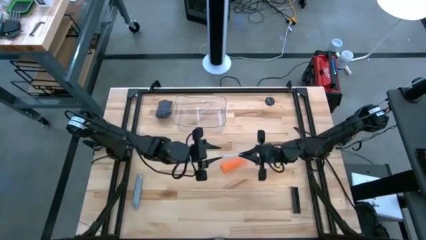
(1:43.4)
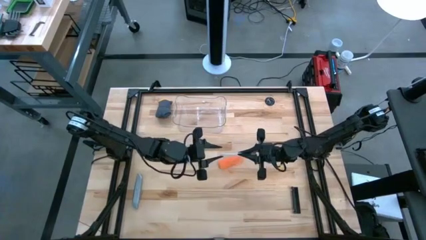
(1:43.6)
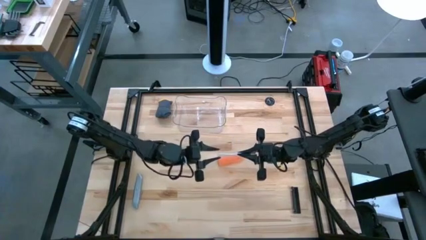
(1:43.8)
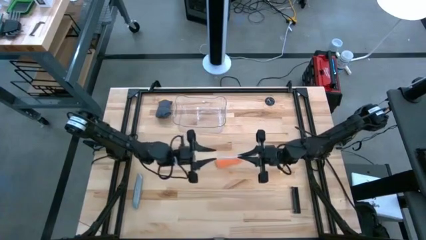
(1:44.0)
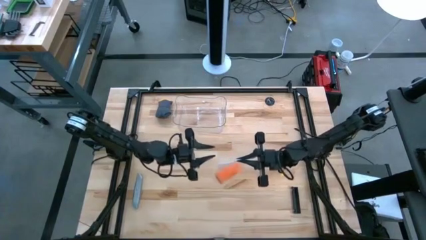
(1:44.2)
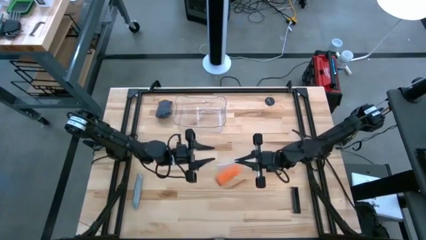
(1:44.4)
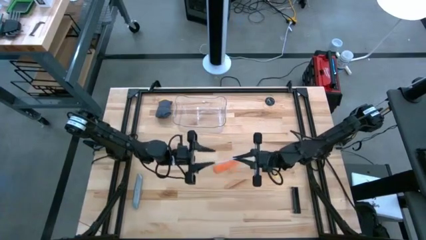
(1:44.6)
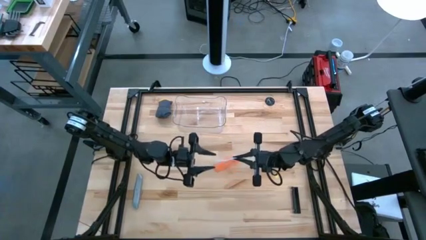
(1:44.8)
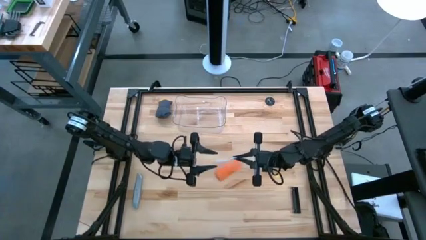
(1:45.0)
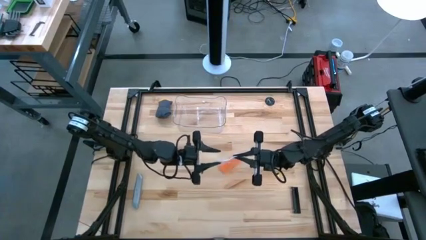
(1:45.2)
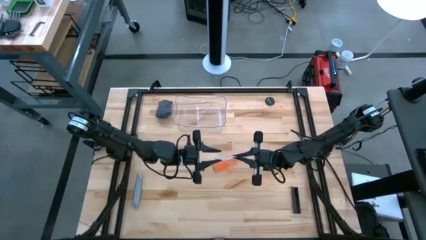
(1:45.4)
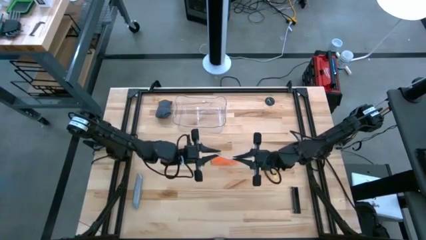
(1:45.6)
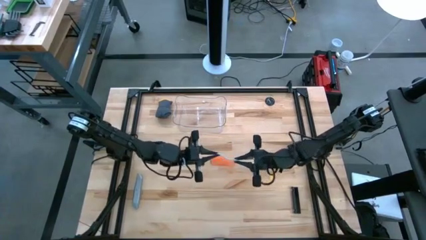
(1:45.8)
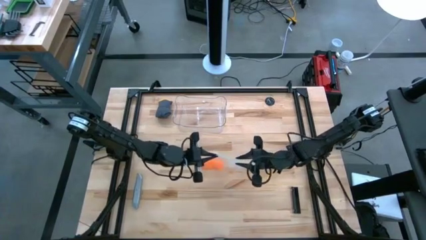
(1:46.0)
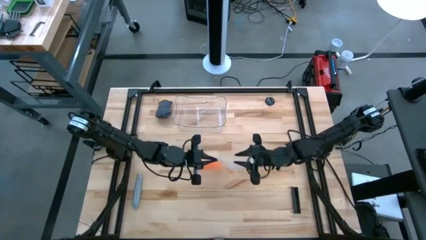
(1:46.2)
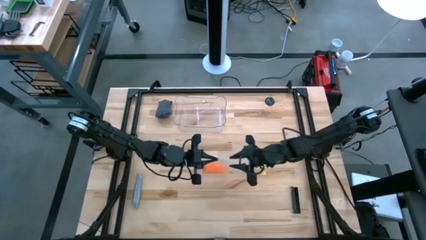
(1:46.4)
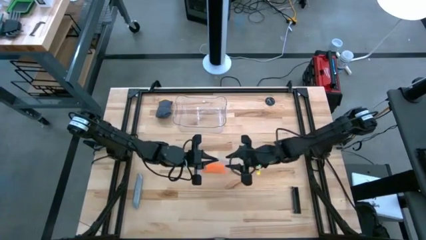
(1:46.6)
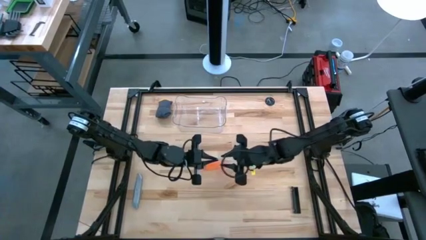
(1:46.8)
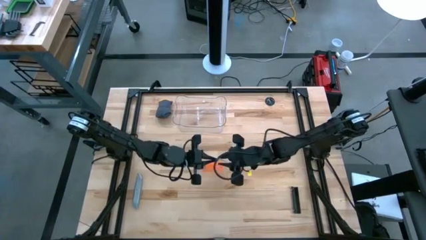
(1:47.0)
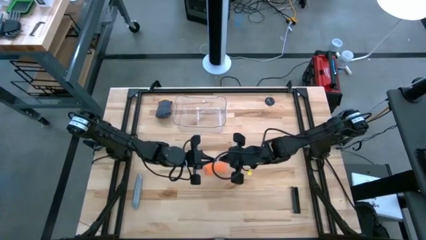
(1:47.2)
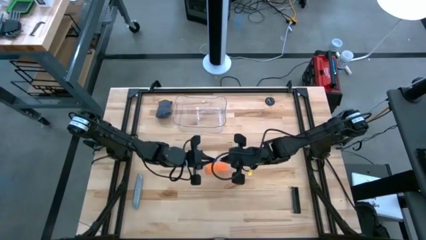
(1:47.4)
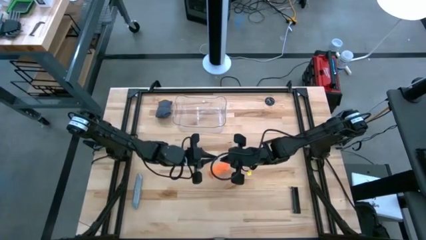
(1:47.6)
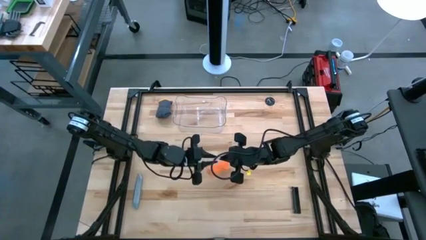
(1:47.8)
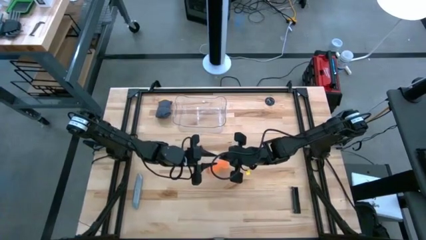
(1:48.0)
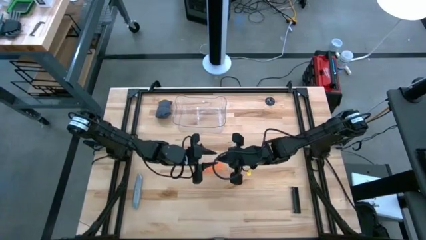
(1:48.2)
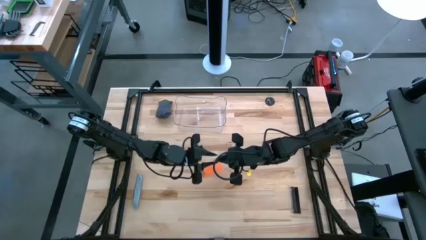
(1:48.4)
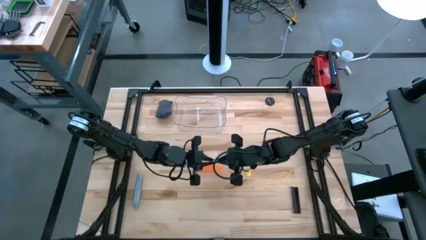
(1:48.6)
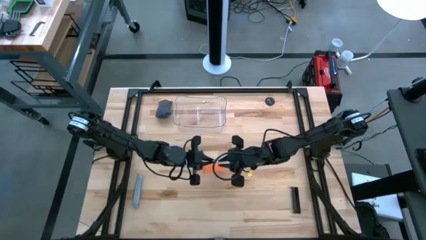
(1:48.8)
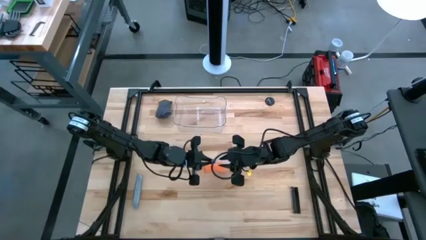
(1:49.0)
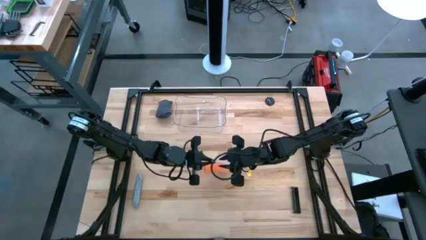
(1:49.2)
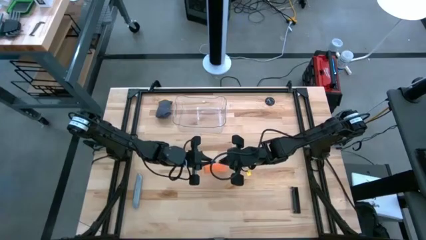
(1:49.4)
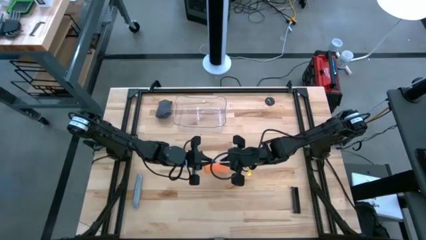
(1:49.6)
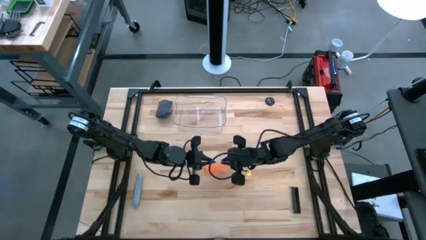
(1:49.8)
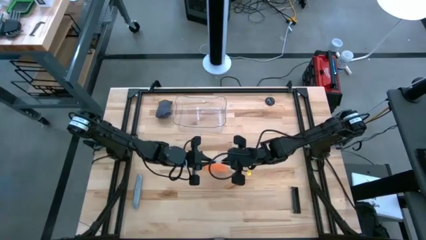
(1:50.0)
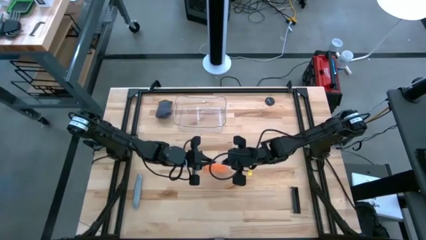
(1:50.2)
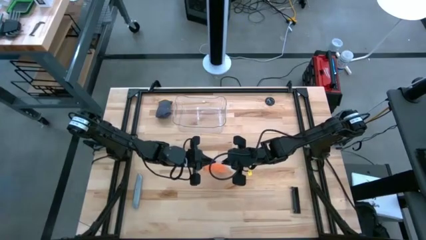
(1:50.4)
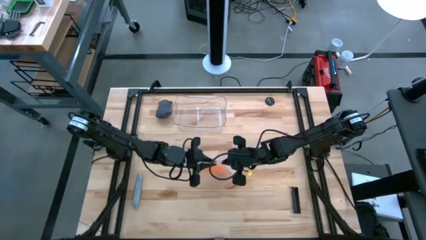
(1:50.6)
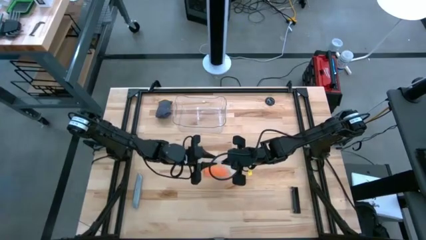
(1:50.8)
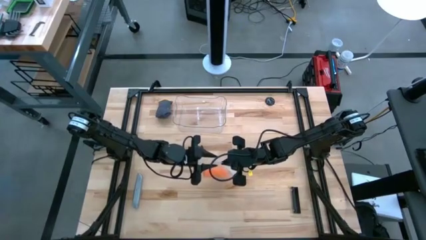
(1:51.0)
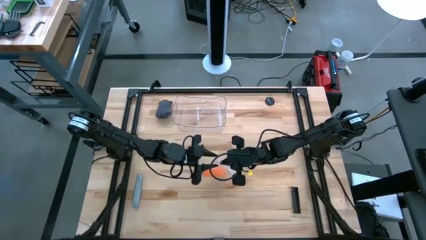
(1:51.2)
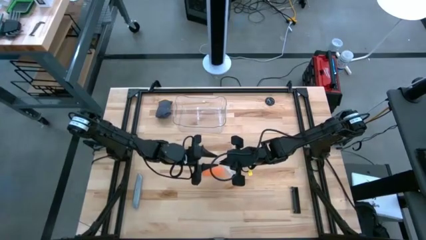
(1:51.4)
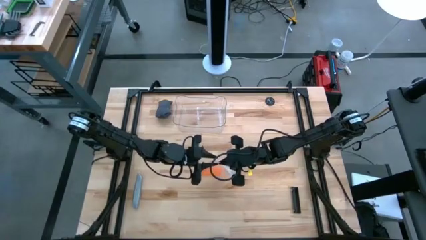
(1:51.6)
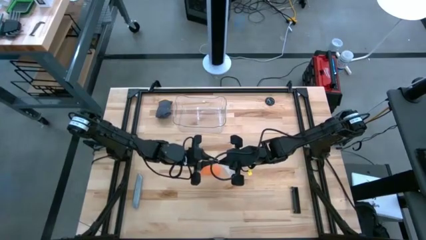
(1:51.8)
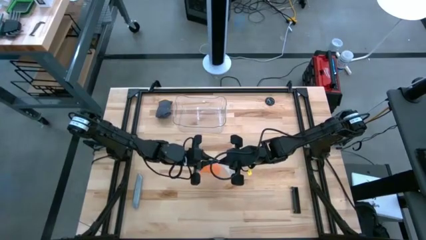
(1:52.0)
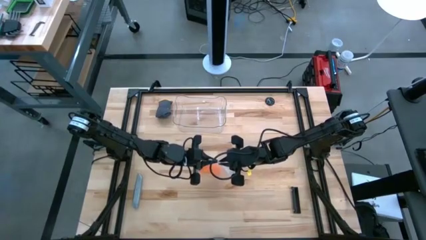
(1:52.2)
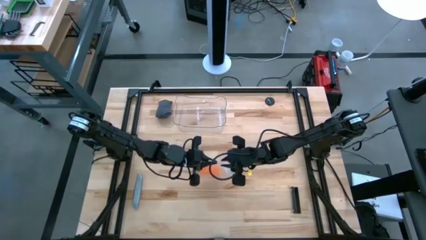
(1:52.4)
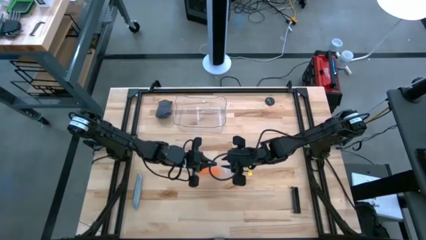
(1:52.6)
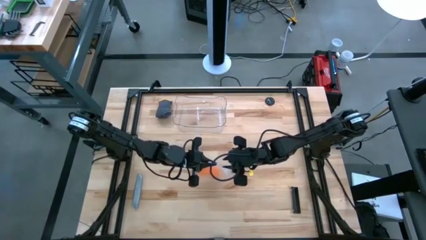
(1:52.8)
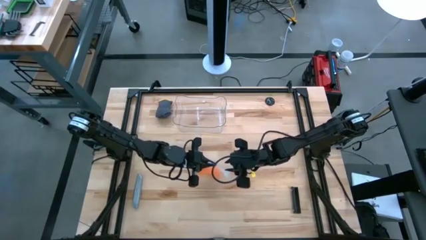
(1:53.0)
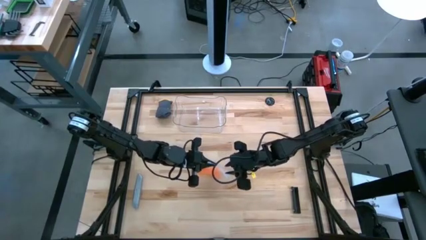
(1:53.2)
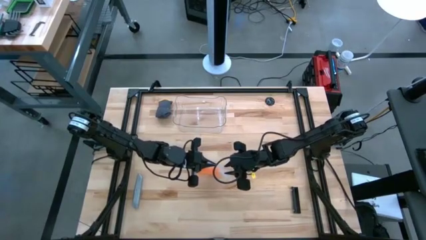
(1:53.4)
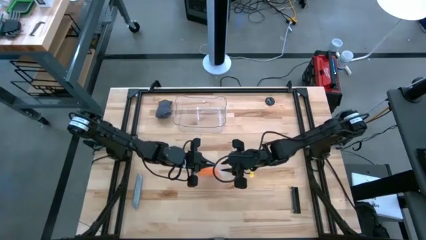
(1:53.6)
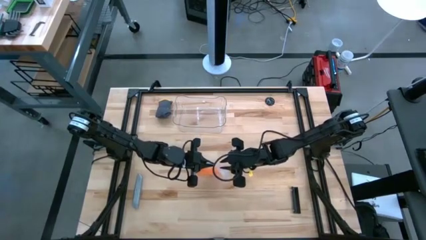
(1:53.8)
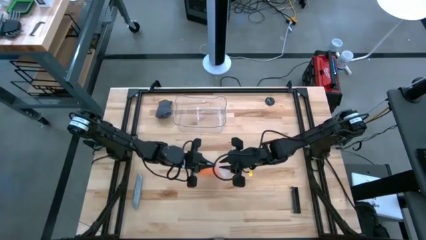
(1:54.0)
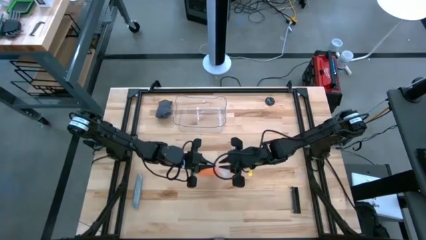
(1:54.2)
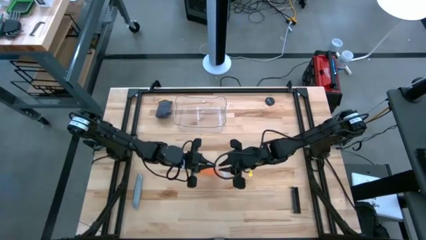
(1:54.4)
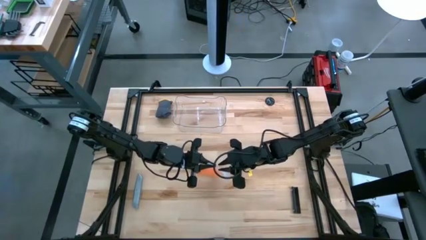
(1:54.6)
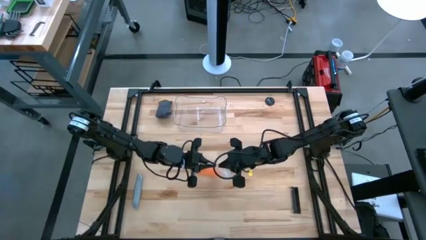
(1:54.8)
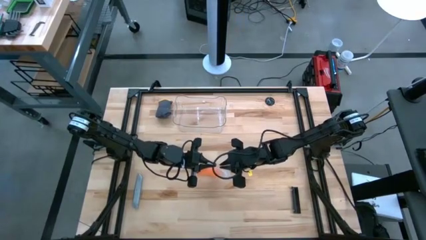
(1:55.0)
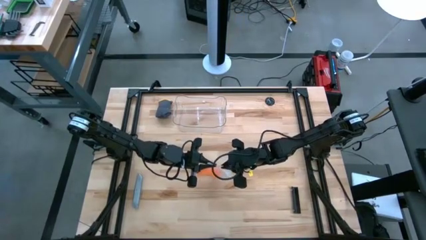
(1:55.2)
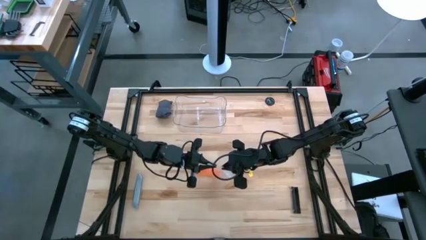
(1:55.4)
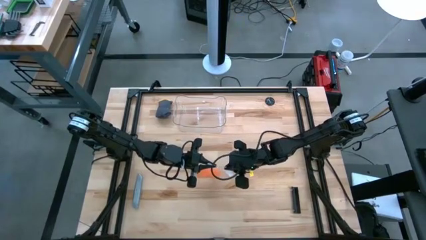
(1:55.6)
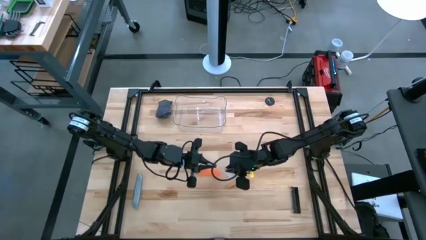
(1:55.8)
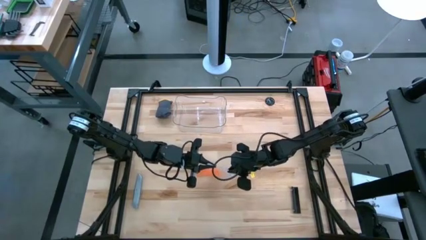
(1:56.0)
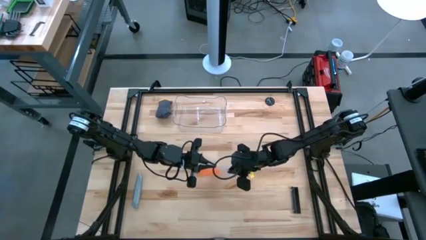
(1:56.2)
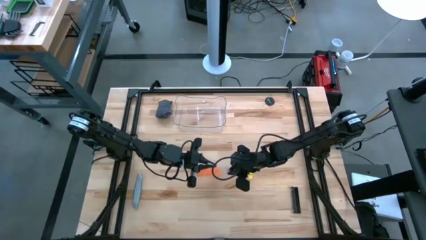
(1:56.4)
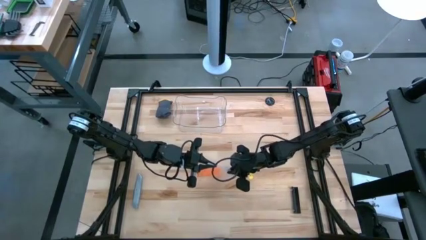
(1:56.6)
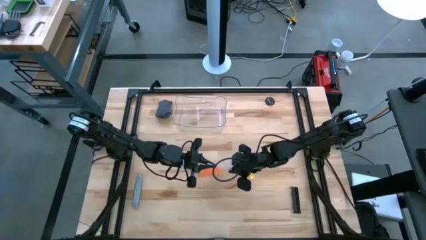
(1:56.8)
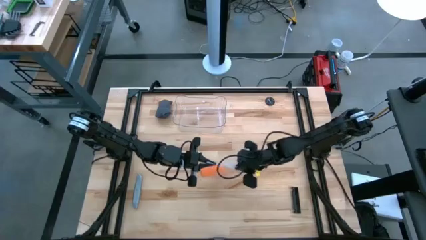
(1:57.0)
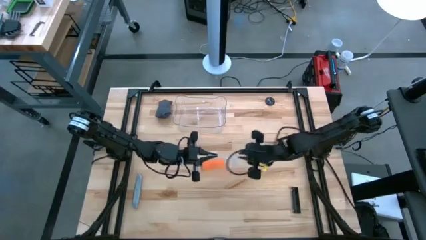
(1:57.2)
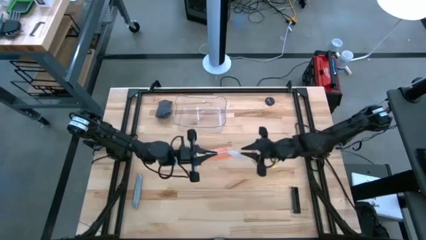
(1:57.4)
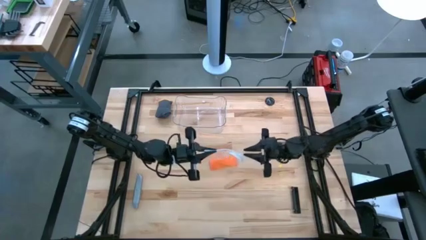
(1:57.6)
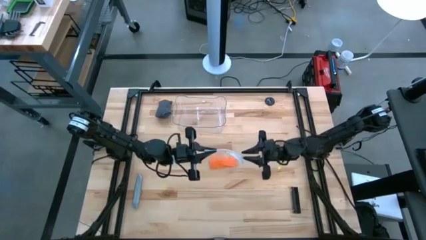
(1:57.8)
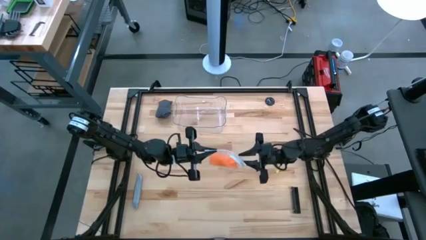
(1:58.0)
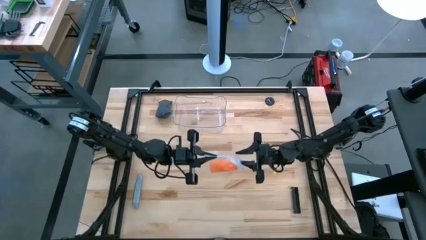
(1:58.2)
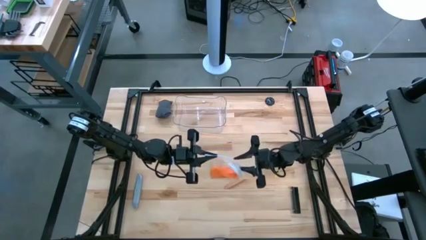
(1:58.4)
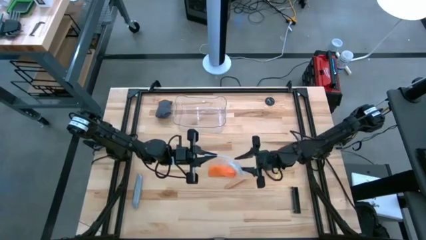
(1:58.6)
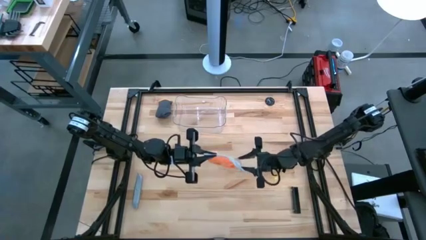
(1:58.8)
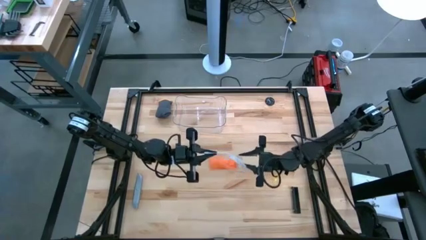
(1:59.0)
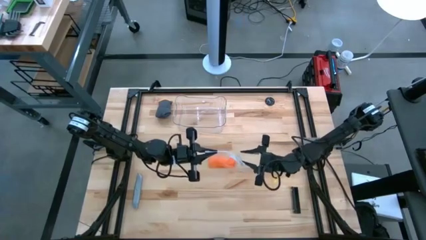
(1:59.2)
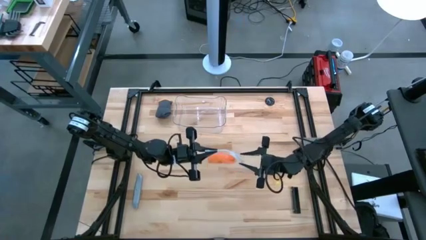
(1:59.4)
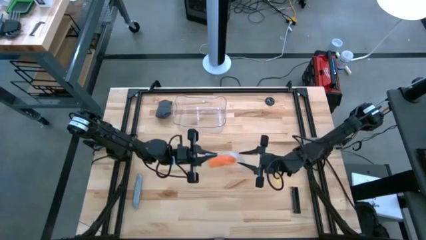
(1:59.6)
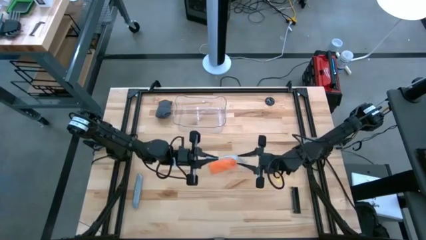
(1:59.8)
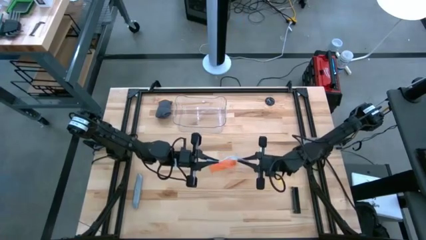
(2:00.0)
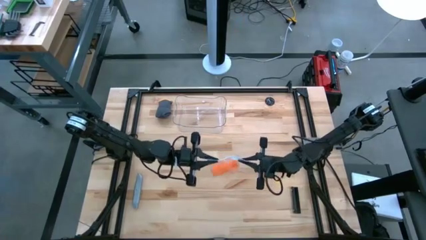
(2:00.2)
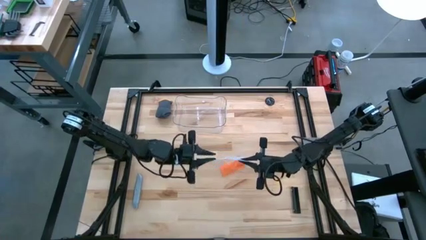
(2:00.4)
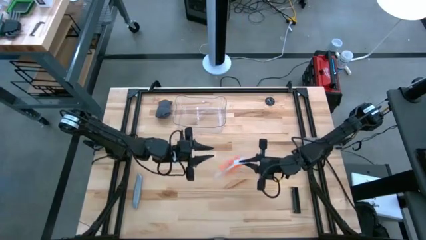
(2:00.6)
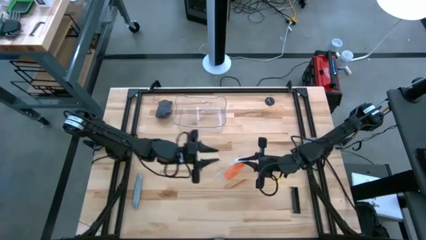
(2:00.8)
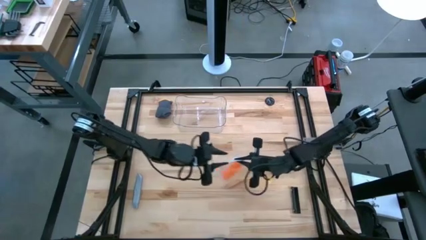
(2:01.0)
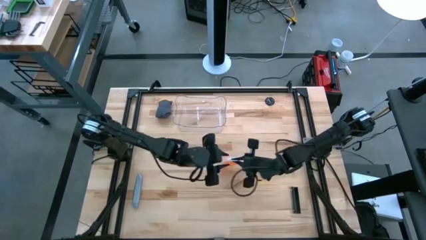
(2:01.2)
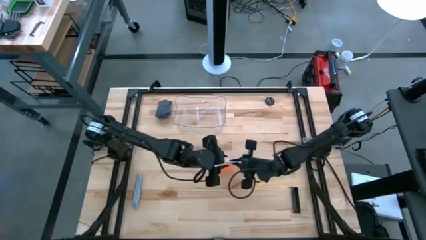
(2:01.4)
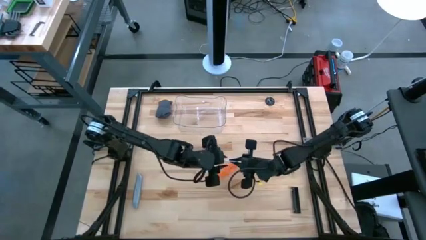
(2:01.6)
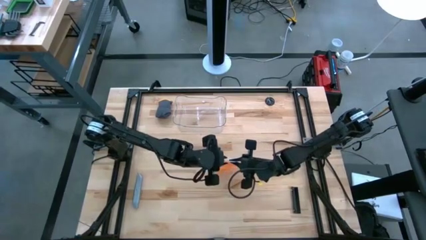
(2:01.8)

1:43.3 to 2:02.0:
Task: Roll bandage
Put the zip bag into the transparent bin
